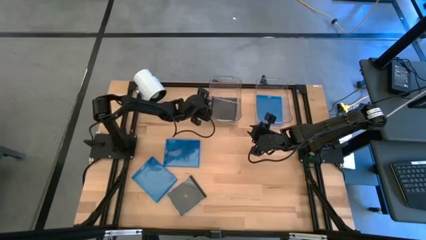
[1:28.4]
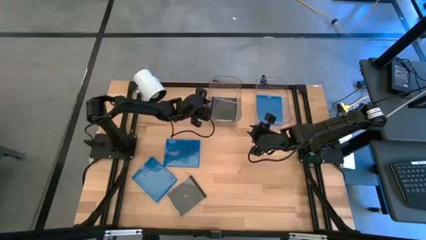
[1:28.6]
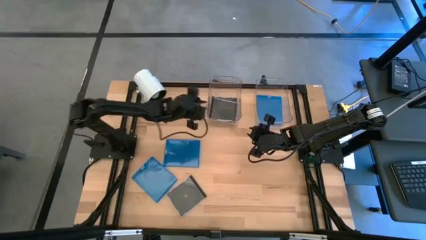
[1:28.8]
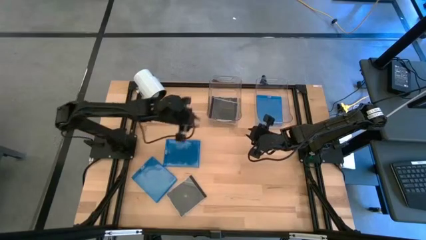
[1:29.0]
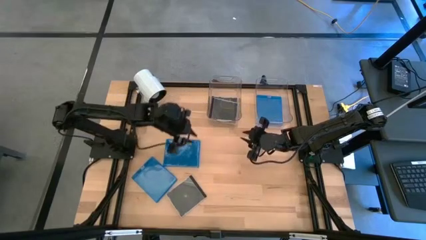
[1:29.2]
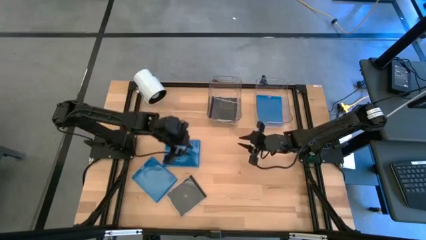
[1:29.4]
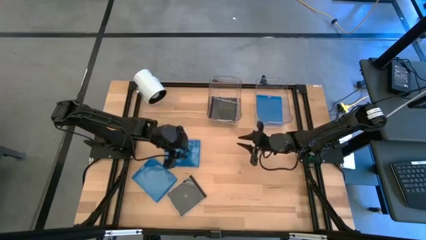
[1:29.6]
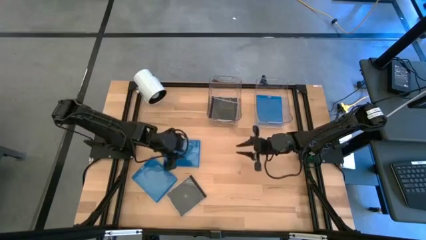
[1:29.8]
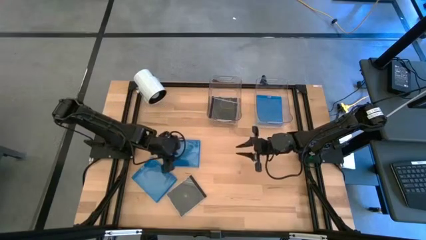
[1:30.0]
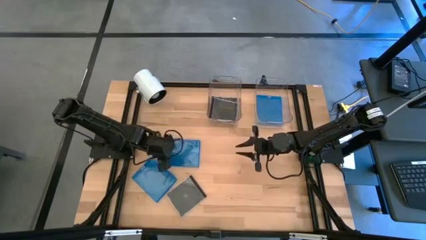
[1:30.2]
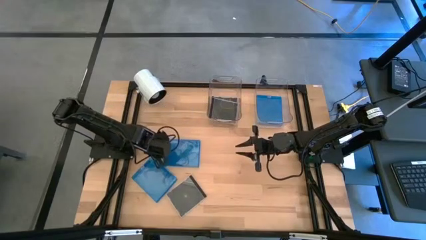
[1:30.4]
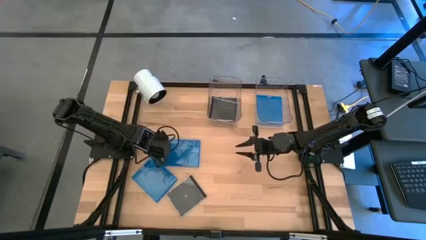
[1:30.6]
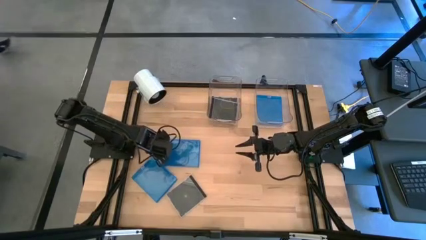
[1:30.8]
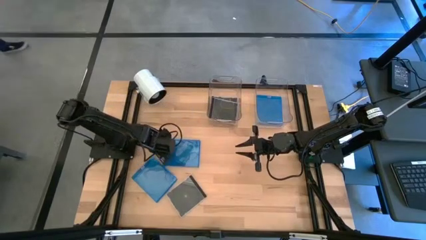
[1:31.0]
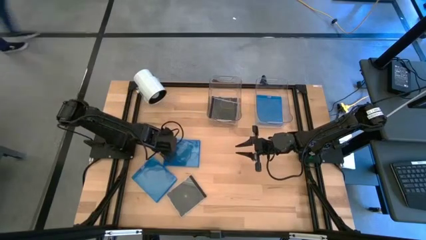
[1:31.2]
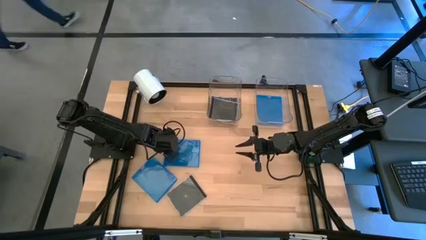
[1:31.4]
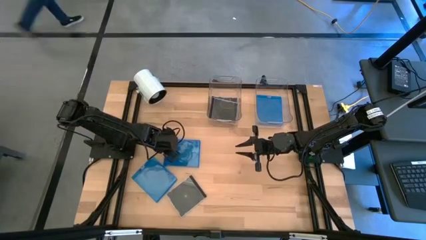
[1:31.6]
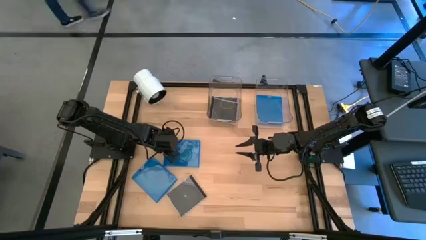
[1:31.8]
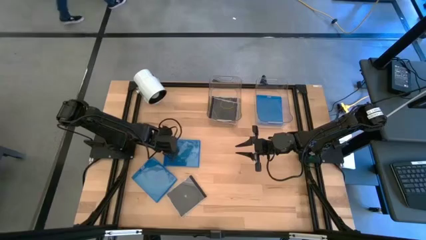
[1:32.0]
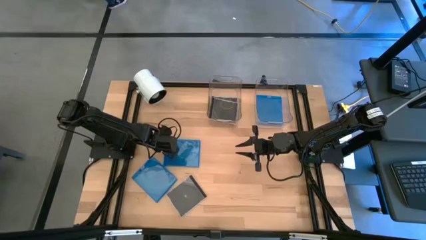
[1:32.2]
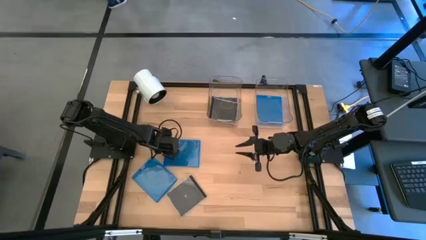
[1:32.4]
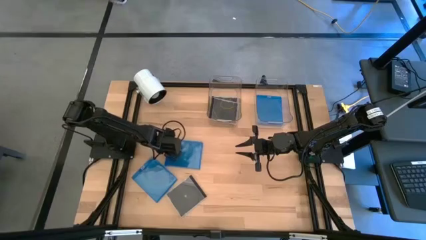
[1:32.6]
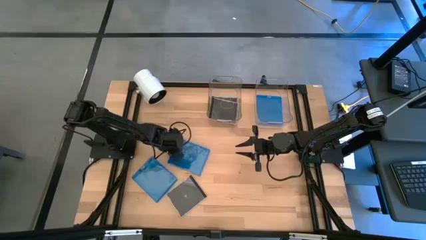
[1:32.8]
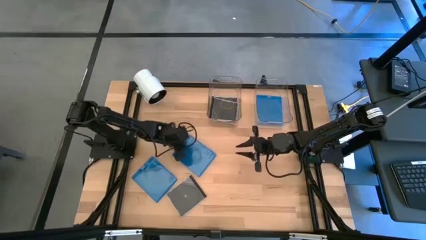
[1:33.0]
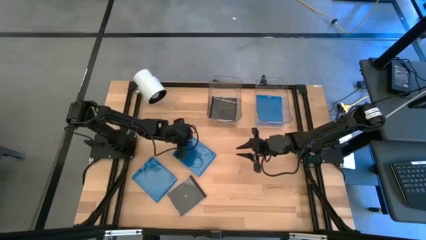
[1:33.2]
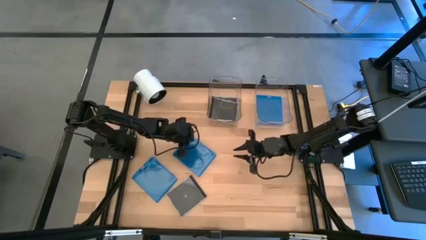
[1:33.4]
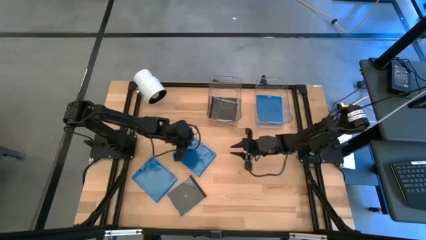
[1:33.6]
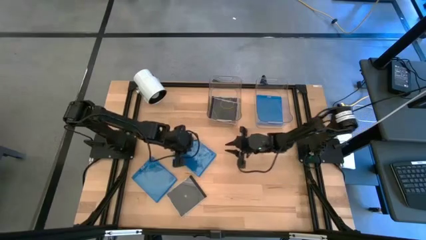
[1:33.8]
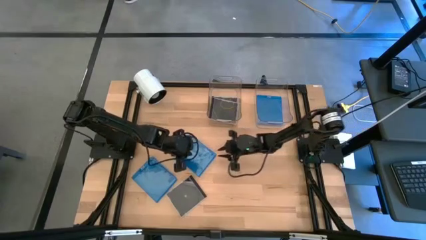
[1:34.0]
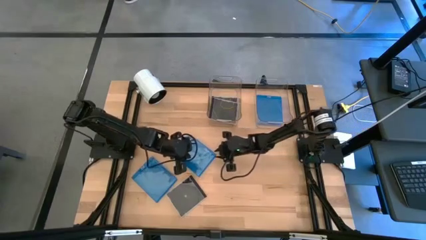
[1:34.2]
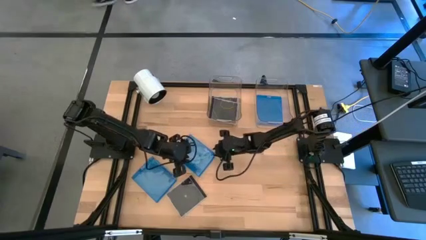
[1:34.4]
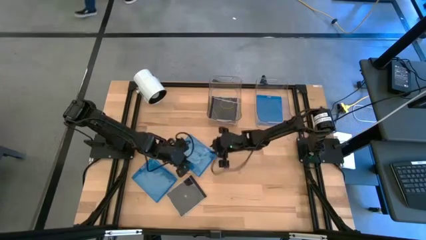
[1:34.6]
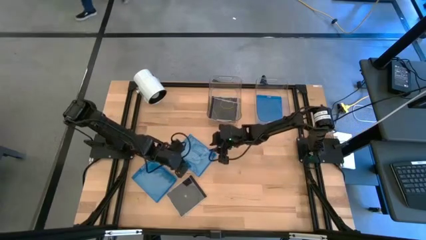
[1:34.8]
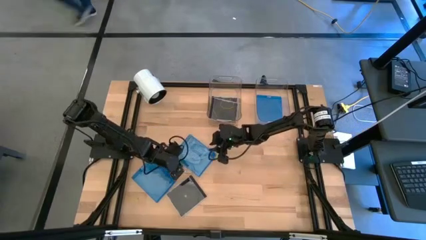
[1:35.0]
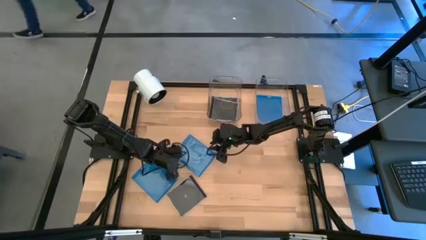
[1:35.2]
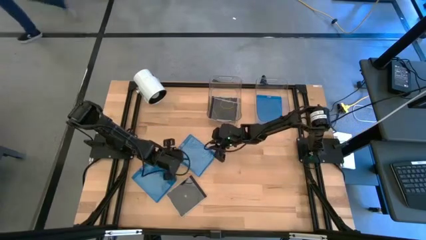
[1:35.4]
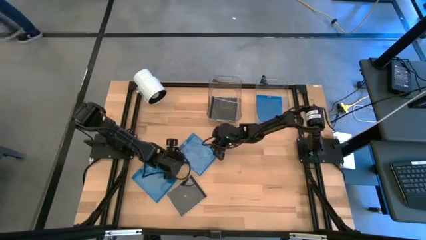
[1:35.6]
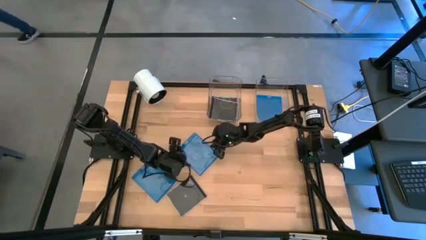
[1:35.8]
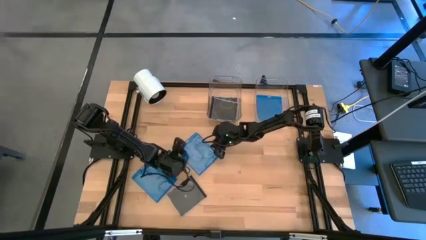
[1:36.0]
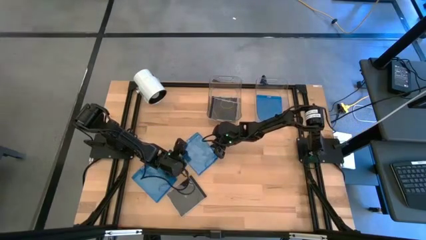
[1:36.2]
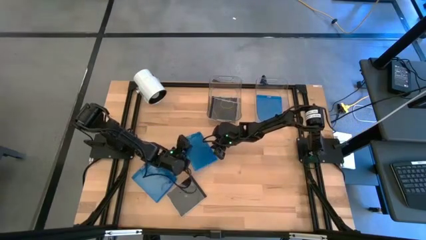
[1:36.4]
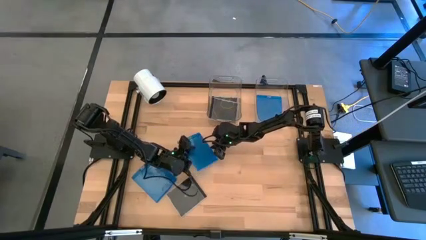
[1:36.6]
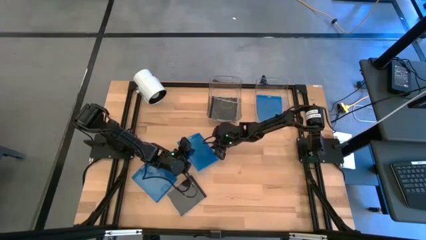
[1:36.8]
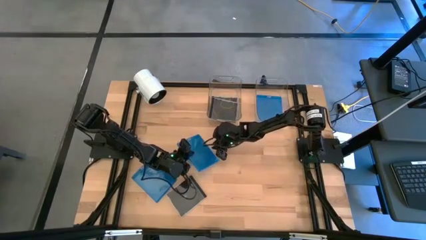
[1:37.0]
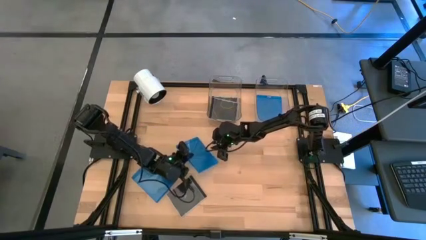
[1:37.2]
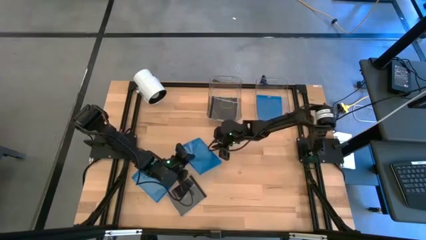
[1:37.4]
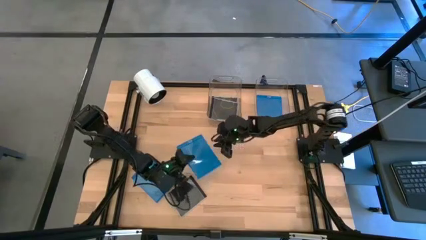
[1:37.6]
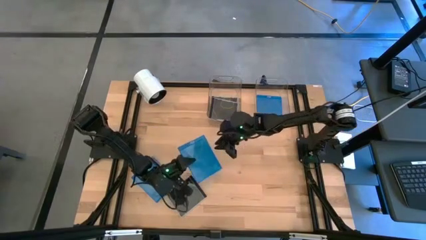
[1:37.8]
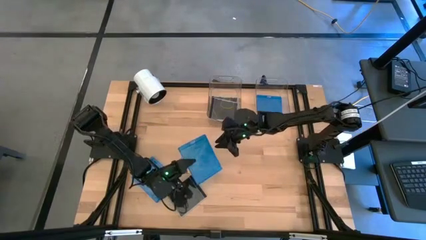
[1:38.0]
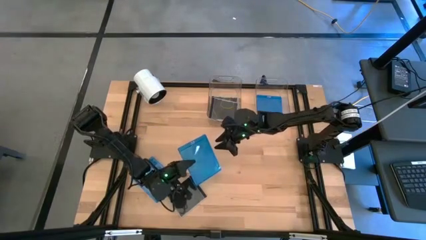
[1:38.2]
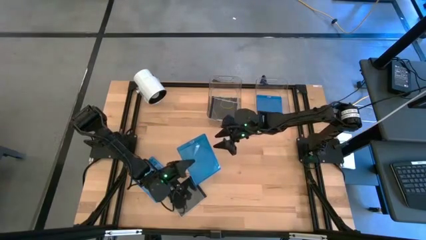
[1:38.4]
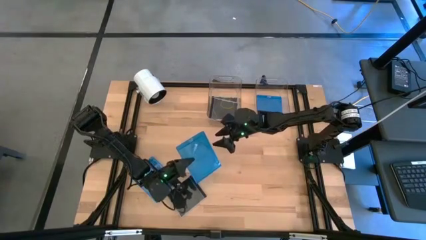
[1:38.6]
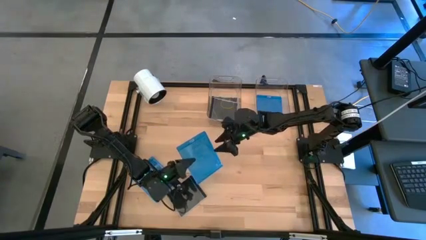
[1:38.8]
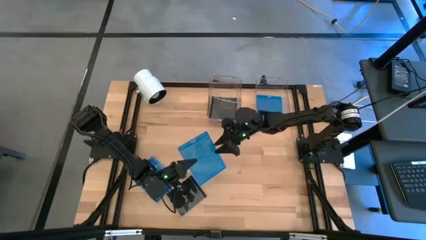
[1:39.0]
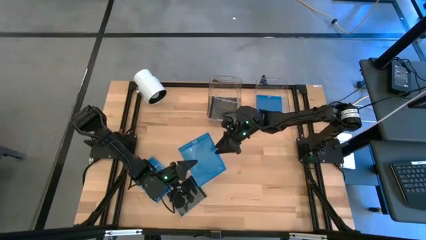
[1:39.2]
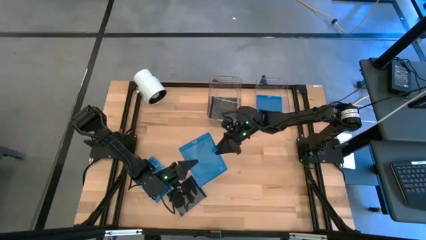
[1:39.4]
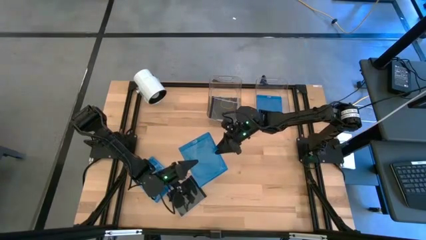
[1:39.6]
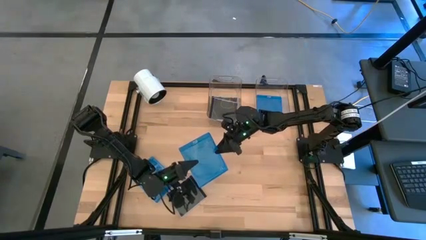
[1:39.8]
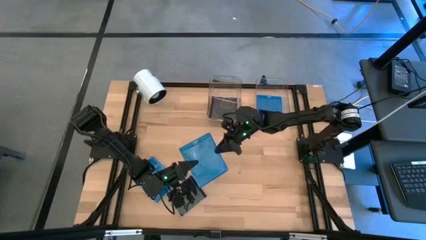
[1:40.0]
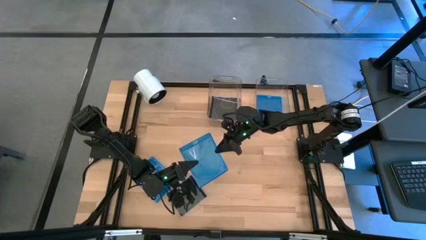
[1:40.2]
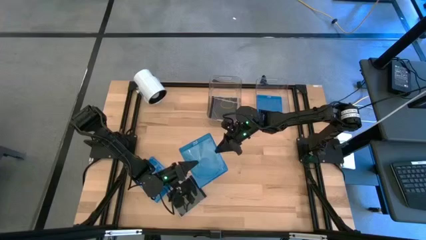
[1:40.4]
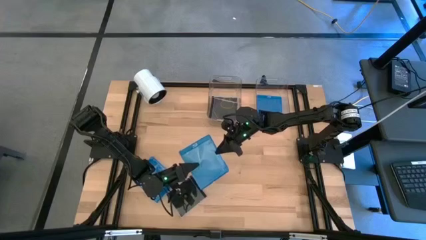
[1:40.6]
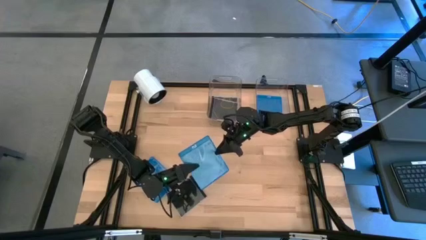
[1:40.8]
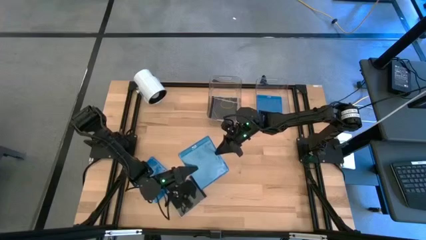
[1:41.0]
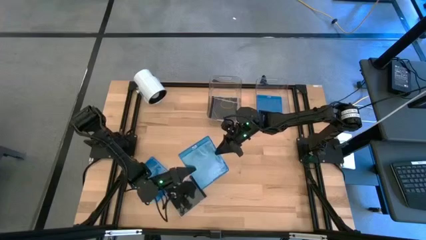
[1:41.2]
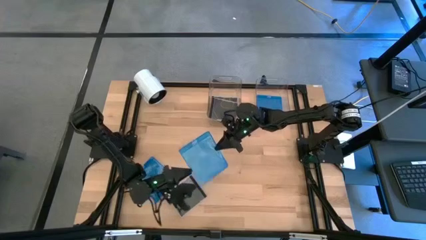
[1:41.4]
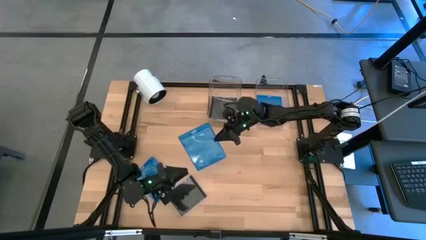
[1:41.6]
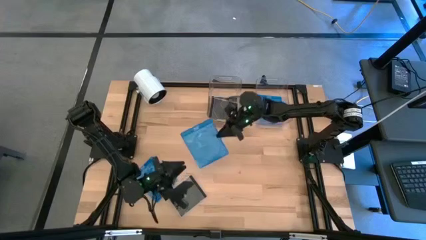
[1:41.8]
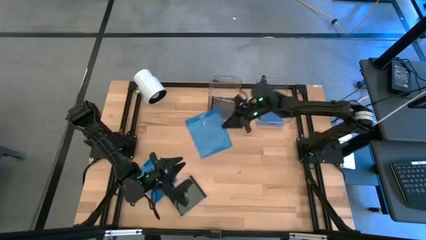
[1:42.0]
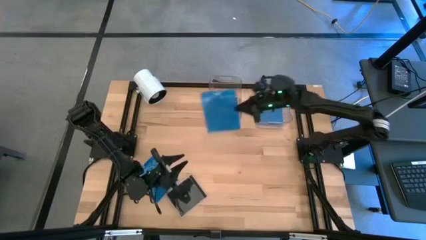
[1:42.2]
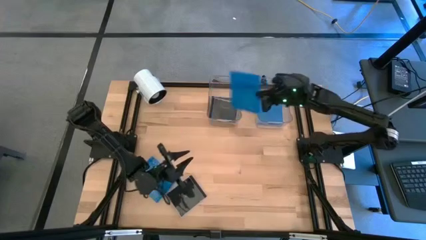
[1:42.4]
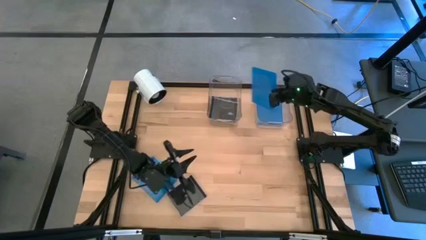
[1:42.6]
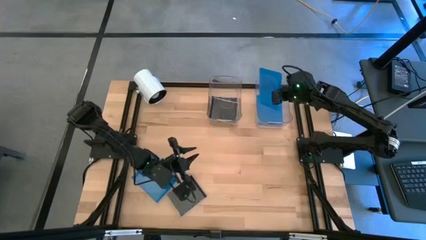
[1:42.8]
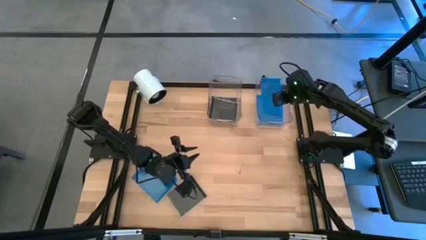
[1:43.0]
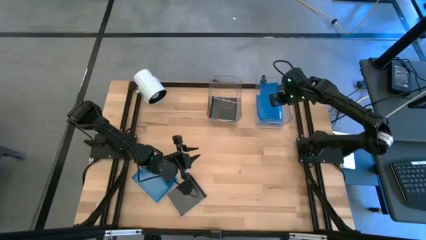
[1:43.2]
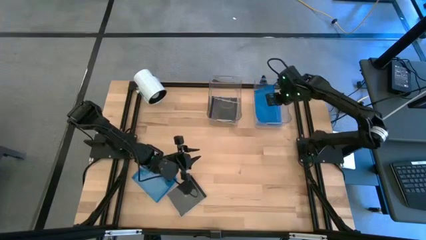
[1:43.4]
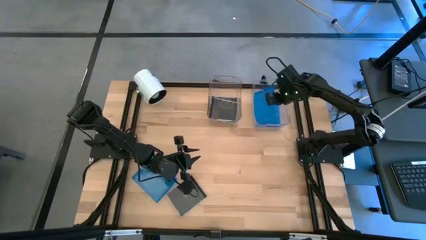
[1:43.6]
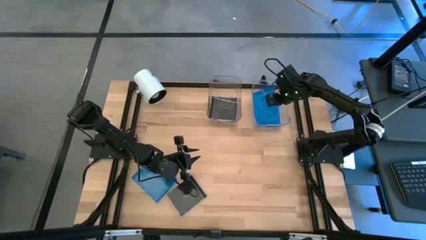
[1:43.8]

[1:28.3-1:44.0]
Task: Pick & place jewel cases by type
Put the top blue CD case into the right transparent bin
